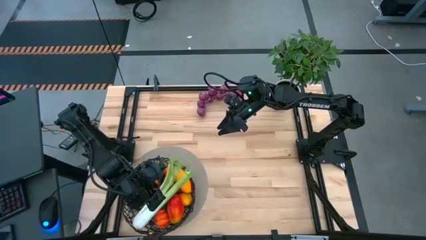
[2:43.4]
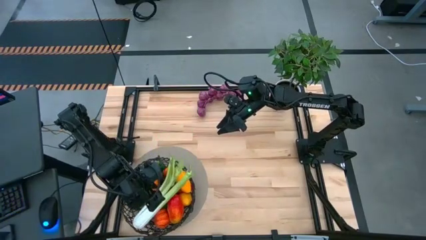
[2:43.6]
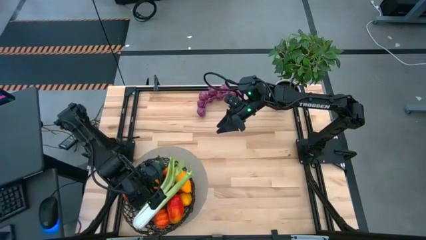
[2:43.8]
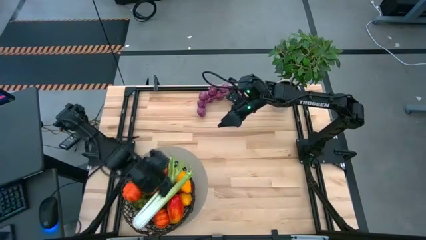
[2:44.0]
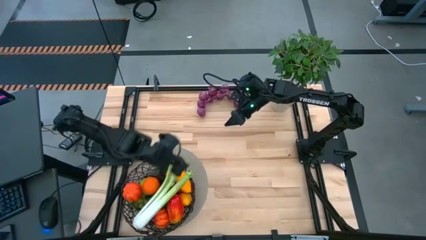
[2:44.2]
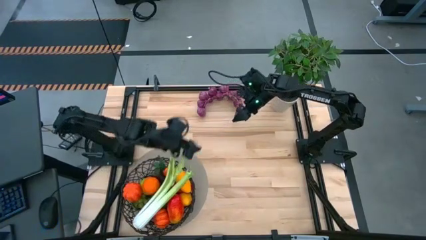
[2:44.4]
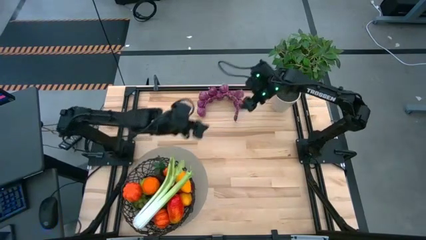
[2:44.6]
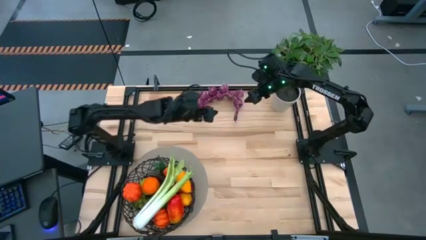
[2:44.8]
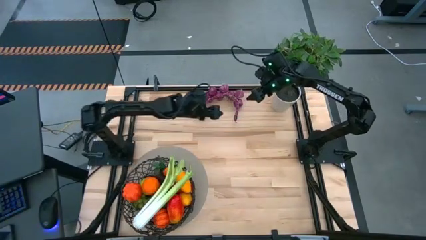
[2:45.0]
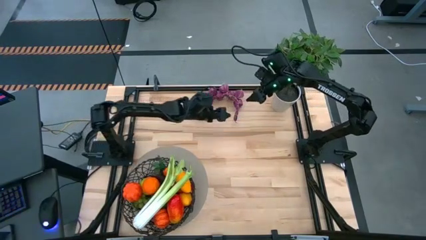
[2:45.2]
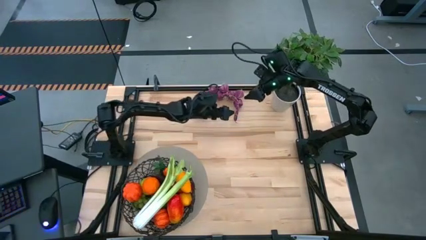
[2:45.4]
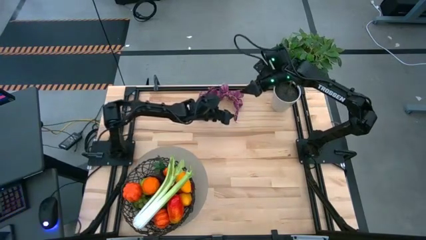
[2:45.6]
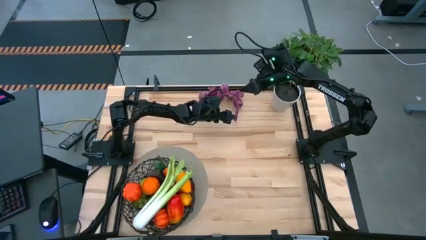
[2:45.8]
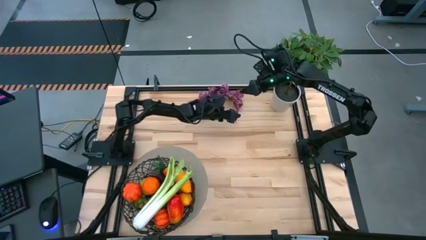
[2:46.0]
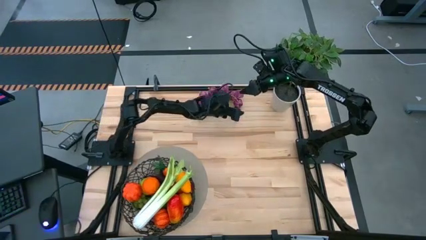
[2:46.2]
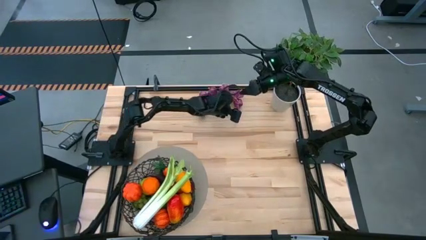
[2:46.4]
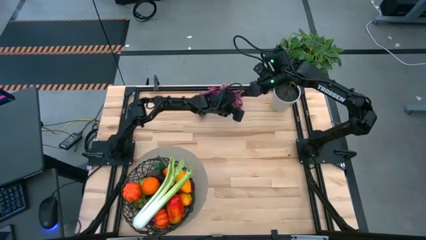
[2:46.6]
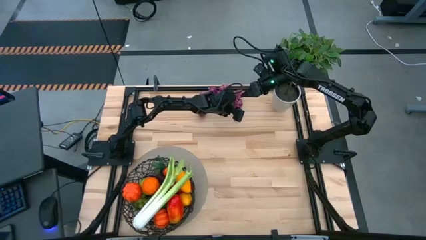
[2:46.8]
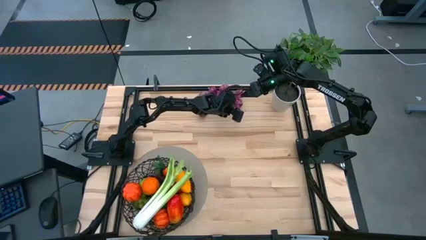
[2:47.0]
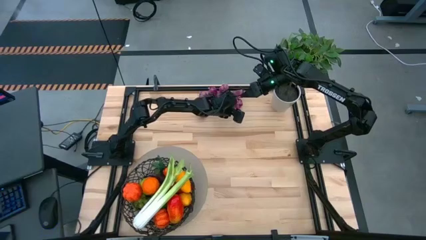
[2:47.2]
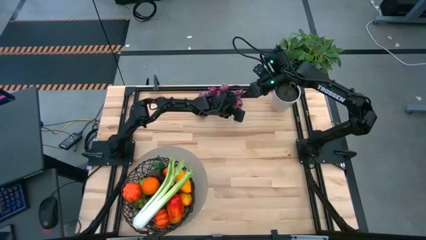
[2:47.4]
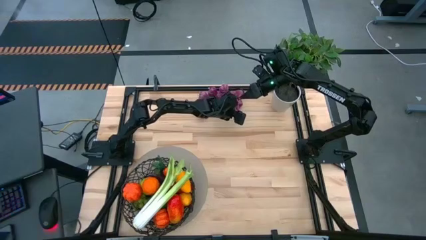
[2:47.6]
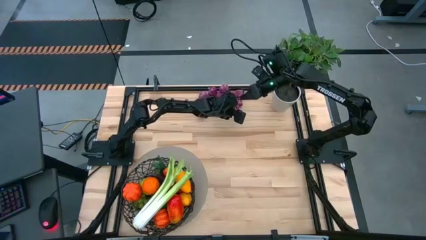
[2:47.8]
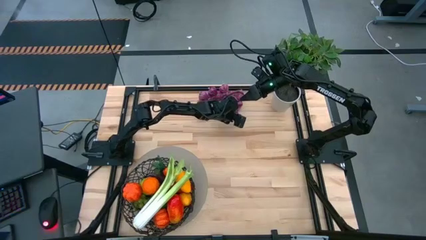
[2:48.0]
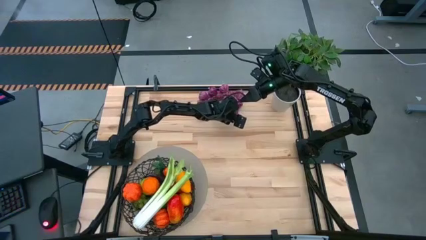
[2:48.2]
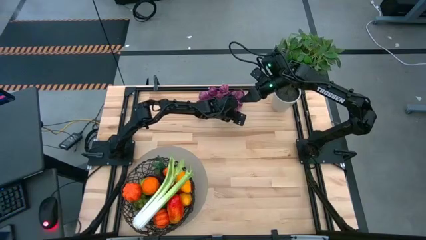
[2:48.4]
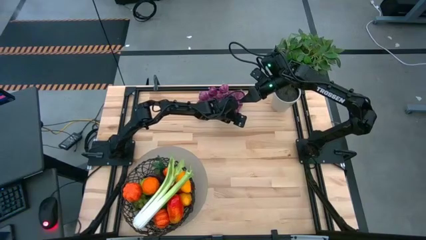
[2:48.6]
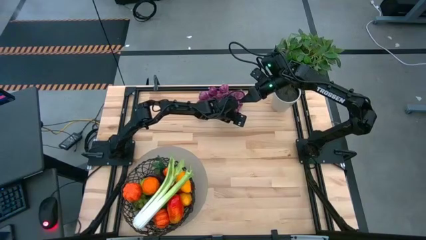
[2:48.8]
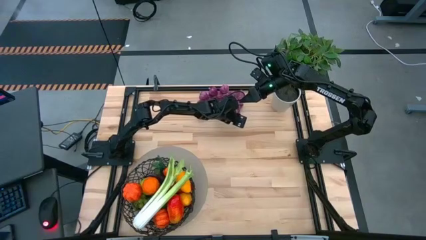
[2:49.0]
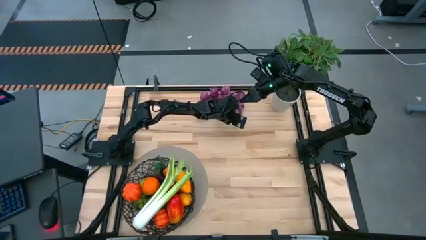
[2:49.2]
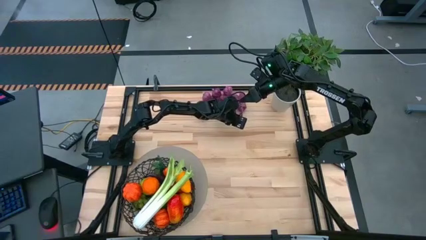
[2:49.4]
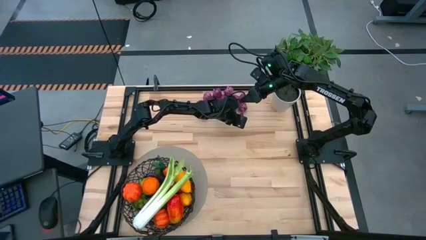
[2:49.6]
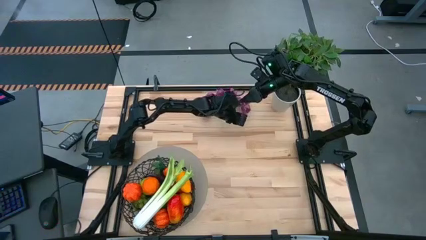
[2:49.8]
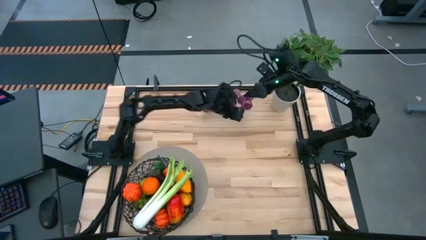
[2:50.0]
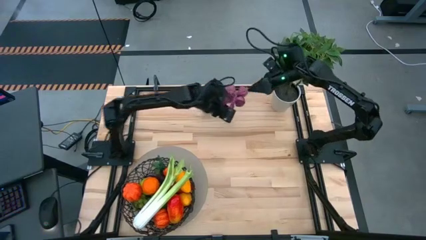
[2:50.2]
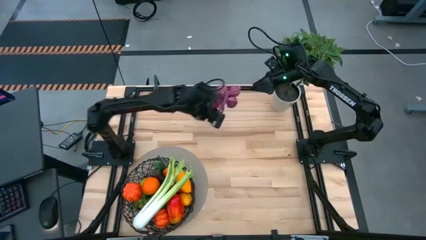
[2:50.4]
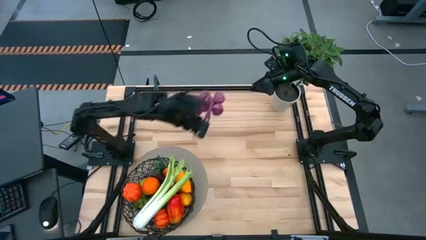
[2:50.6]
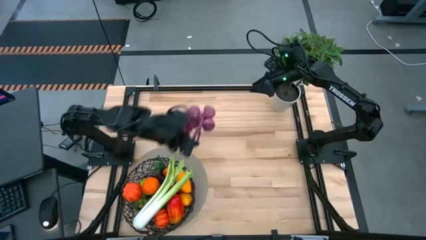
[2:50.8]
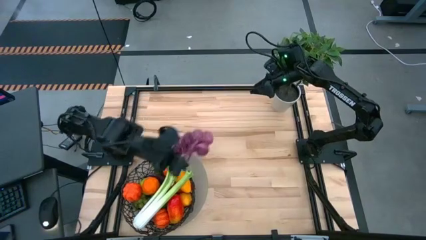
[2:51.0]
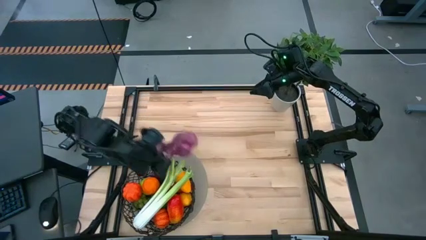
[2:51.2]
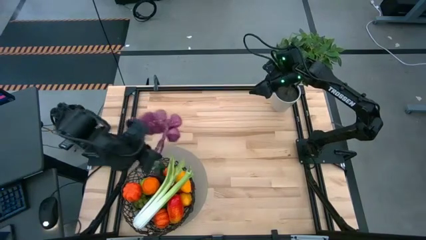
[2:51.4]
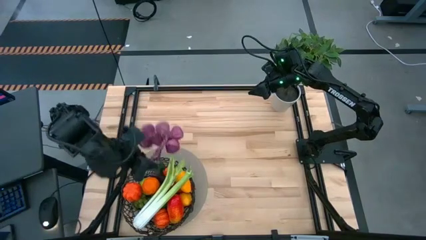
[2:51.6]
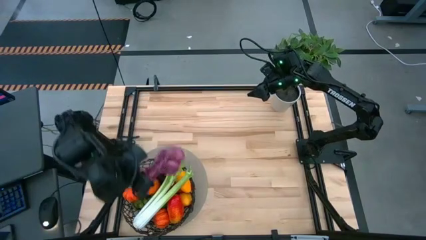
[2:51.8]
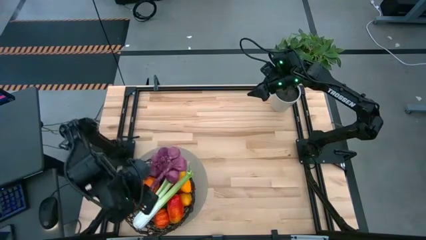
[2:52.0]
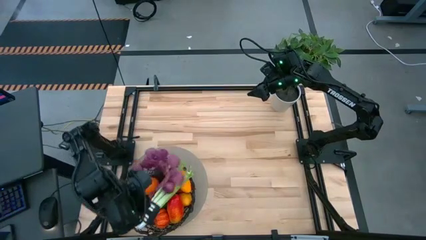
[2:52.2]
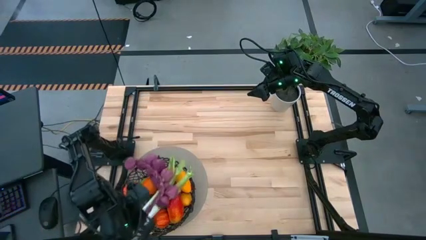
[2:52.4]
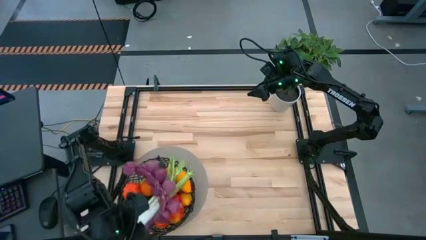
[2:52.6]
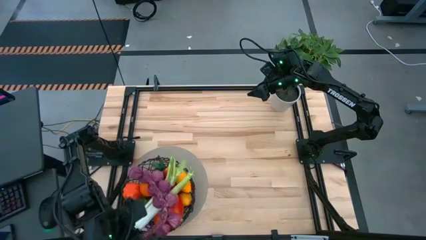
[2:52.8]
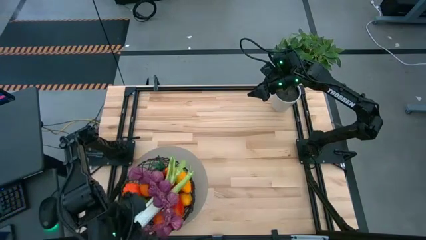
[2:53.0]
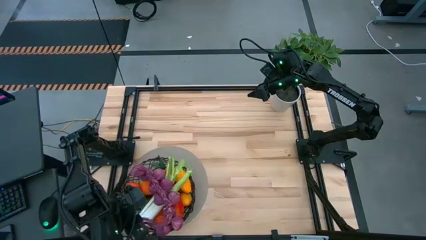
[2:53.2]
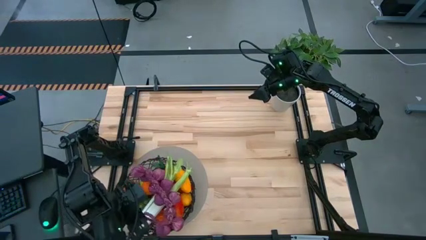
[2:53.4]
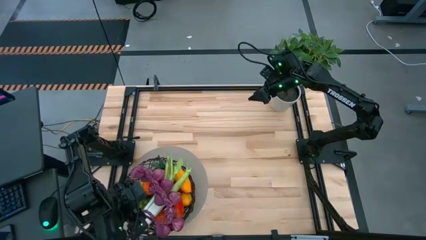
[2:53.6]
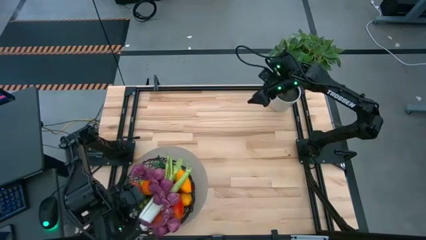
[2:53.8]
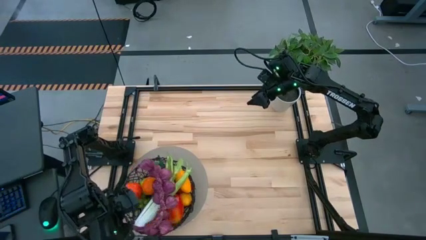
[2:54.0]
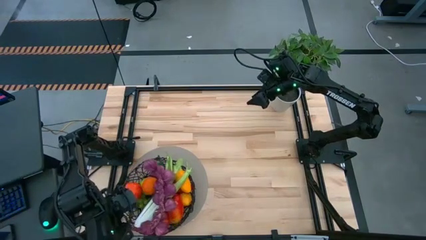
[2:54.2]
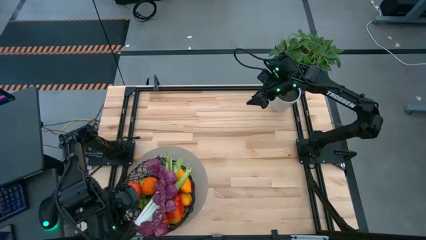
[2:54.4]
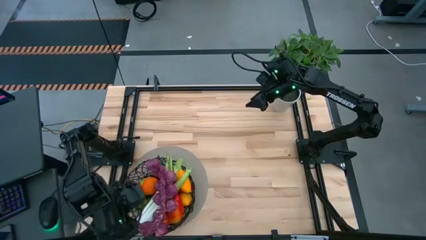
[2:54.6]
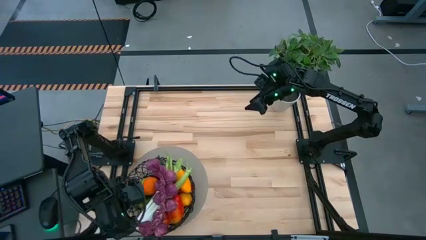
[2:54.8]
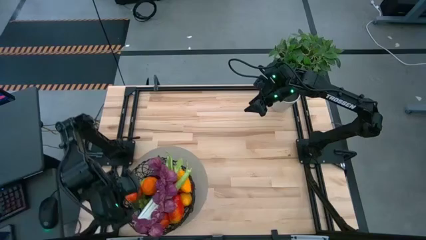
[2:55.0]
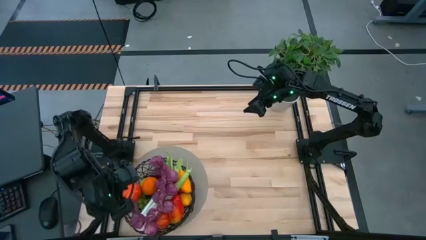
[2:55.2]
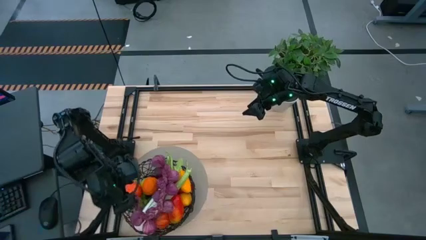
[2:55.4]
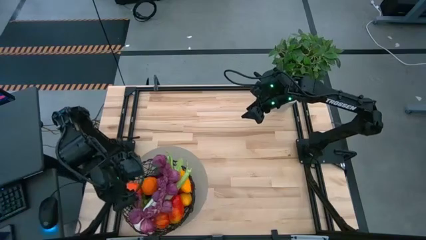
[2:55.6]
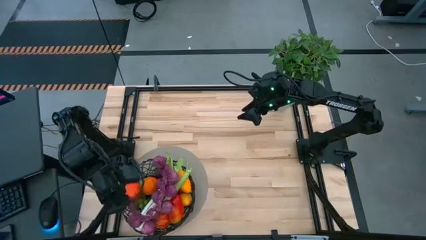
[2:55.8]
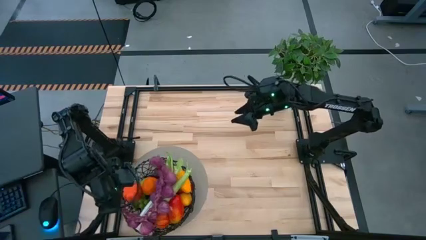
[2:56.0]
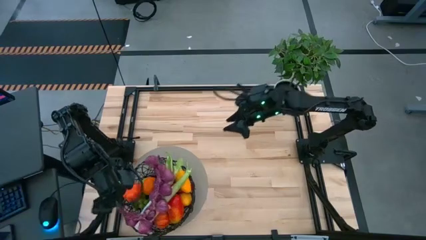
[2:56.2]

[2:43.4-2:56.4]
Task: Build produce basket
Put the purple garlic into the black basket

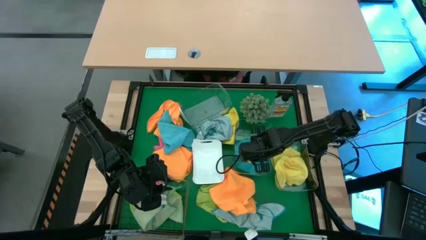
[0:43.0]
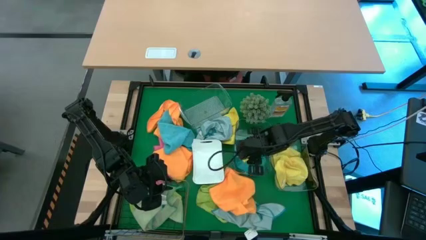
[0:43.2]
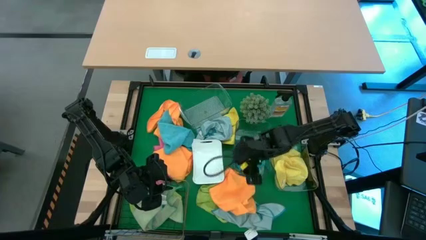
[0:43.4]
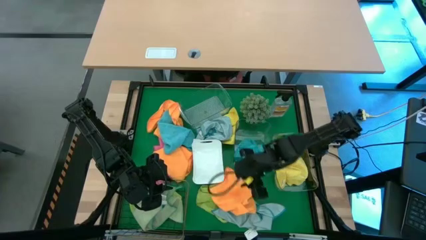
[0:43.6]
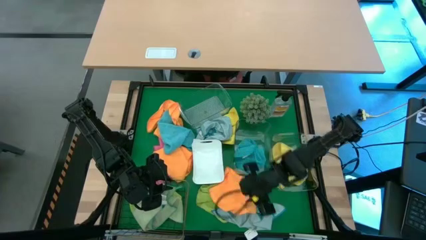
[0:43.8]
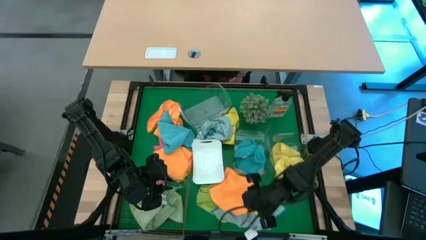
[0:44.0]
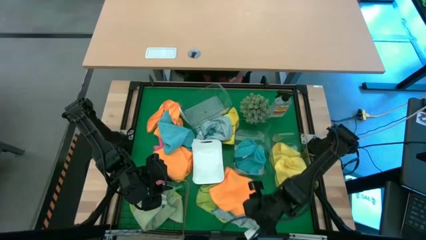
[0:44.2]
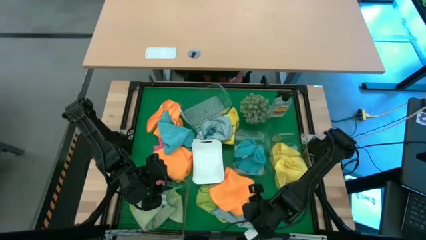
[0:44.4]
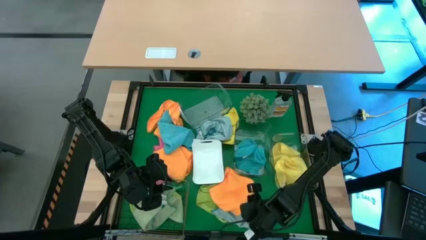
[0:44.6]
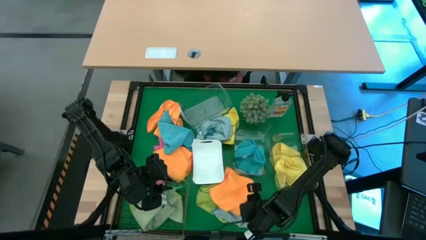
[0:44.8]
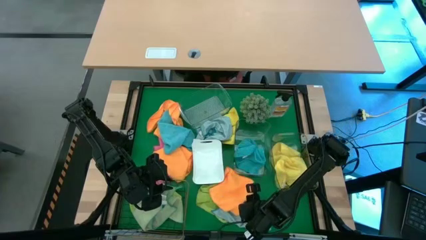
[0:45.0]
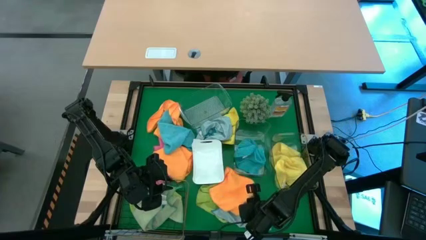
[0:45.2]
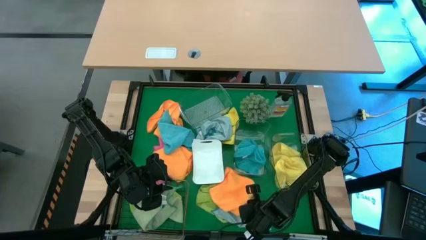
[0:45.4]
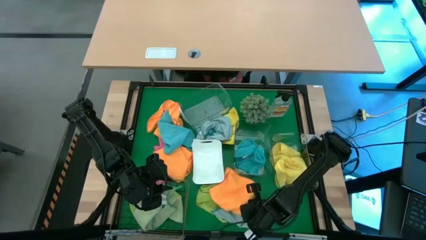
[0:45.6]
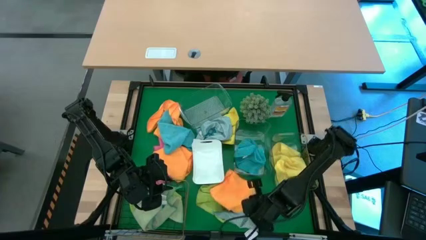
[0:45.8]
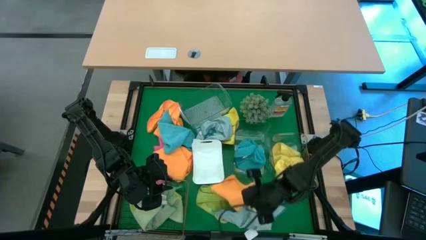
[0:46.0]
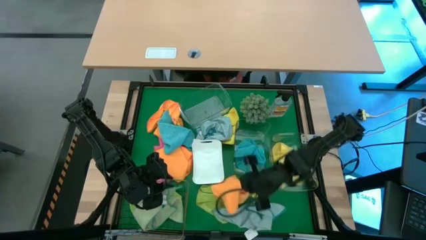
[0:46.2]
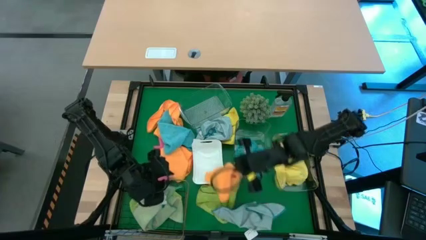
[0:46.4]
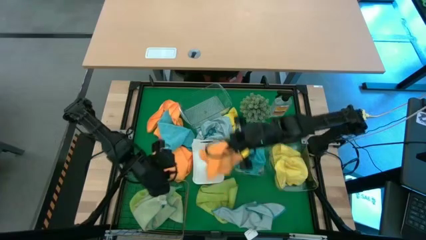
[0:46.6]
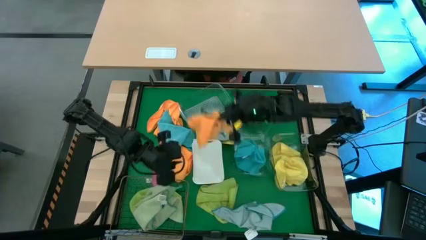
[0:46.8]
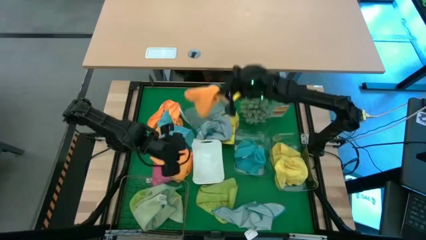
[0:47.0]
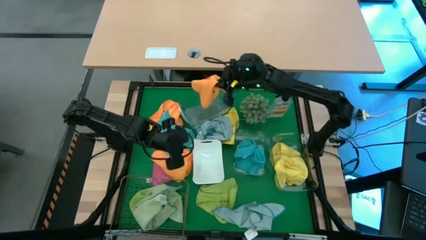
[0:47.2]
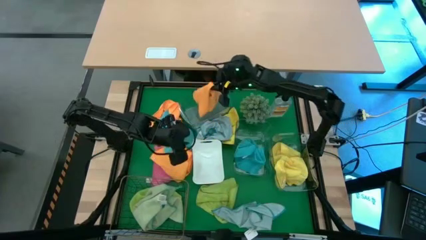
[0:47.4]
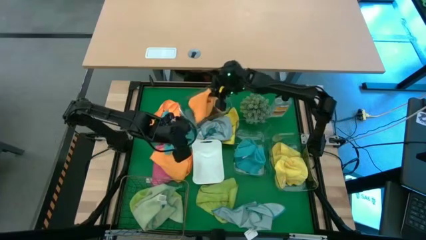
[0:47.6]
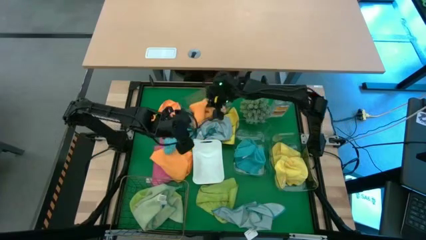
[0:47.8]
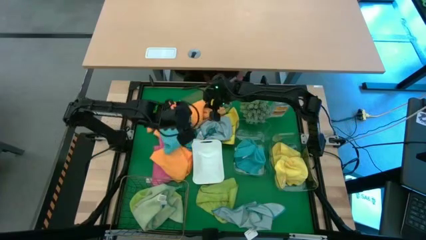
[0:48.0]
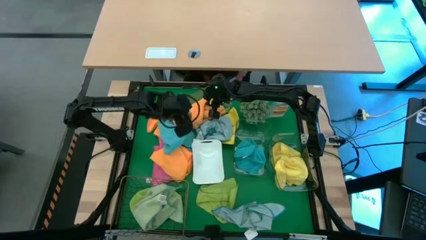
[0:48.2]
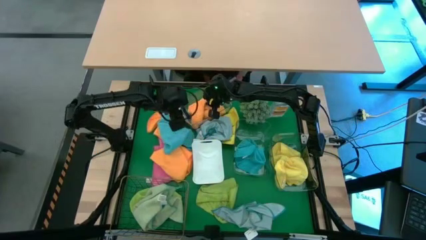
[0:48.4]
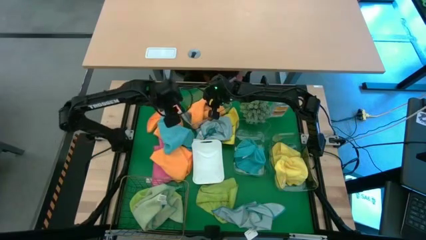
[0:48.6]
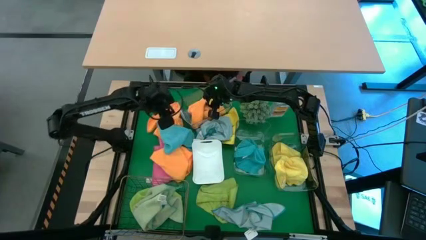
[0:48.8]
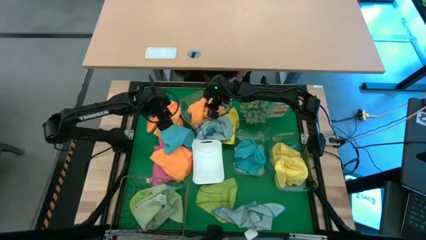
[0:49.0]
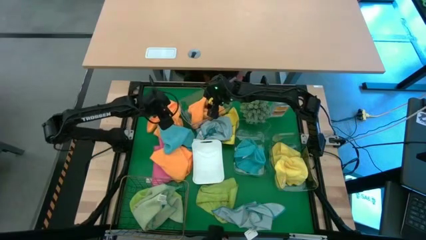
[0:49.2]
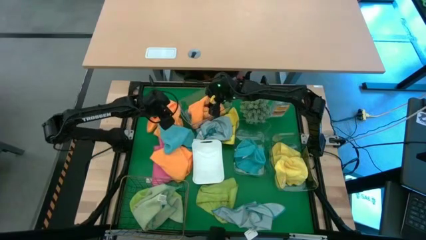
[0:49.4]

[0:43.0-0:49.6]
Task: Sort microfiber towel by color & place in baskets
Put the orange microfiber towel into the top transparent bin
